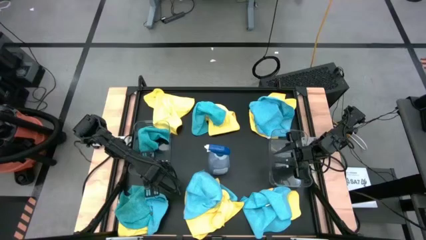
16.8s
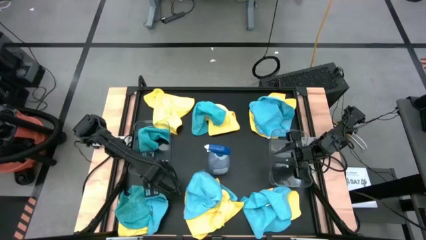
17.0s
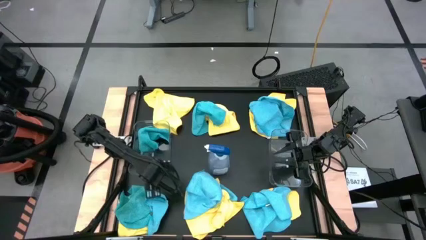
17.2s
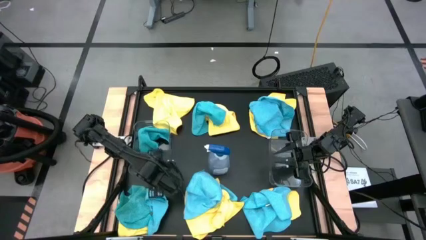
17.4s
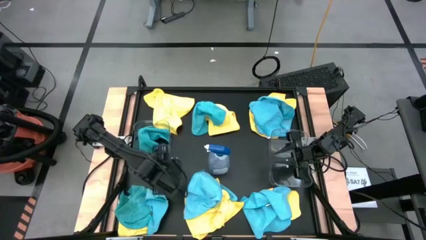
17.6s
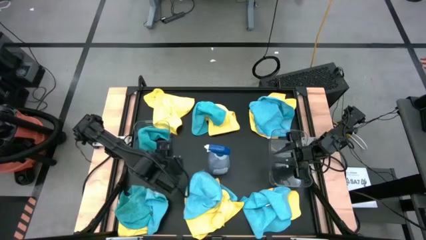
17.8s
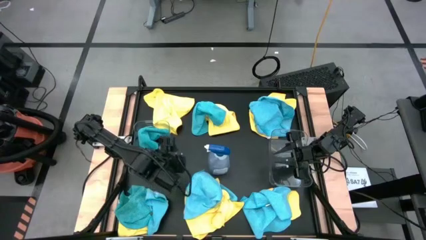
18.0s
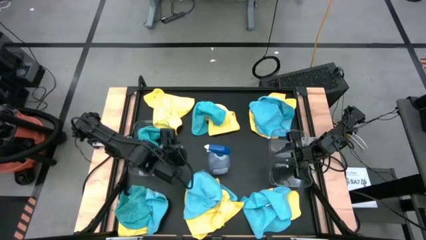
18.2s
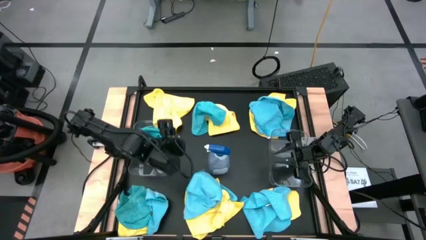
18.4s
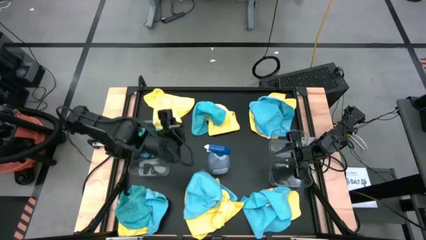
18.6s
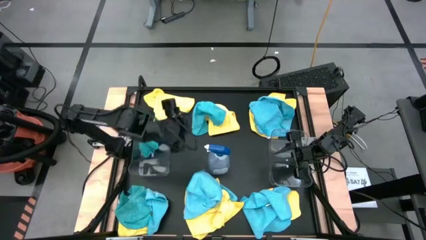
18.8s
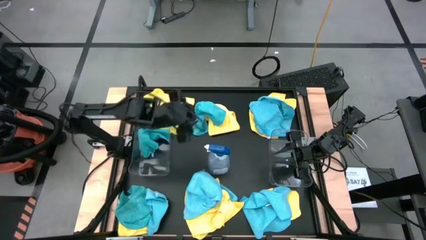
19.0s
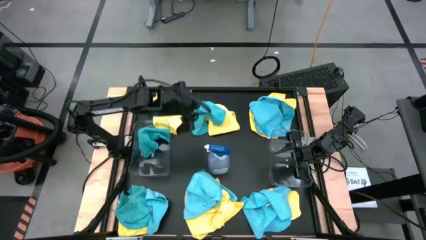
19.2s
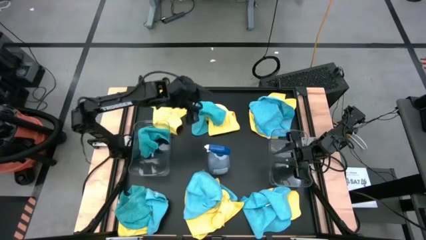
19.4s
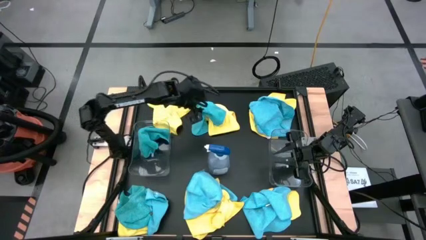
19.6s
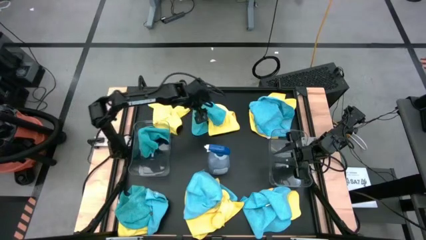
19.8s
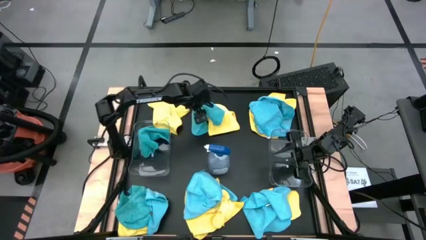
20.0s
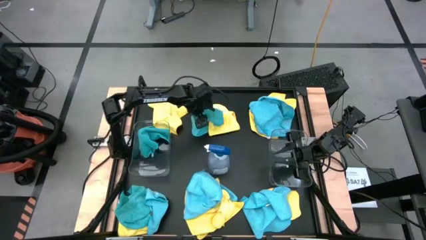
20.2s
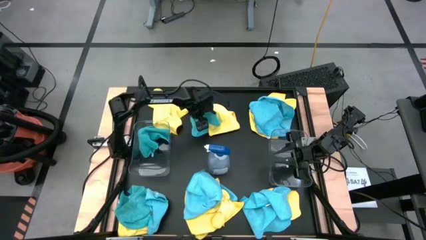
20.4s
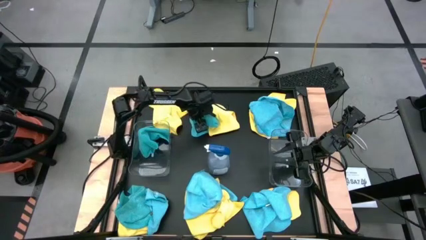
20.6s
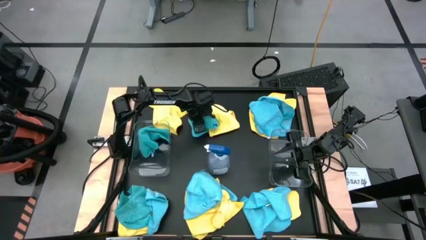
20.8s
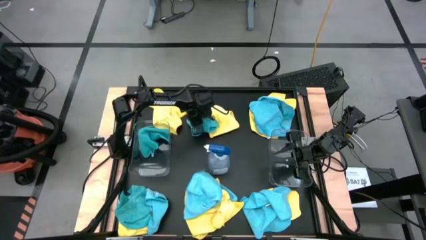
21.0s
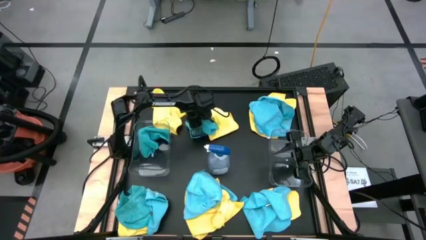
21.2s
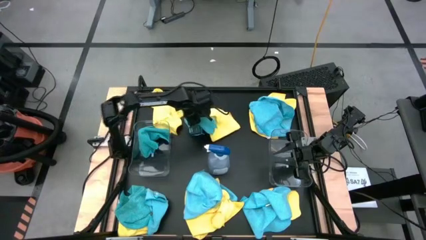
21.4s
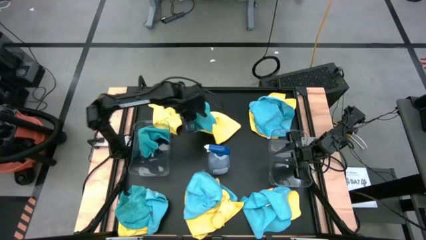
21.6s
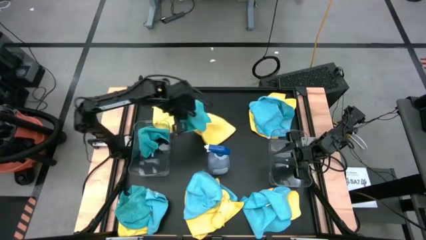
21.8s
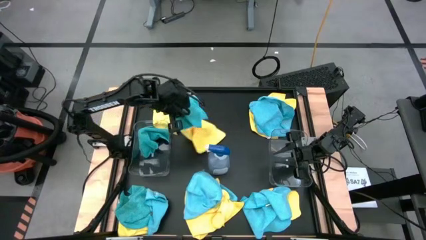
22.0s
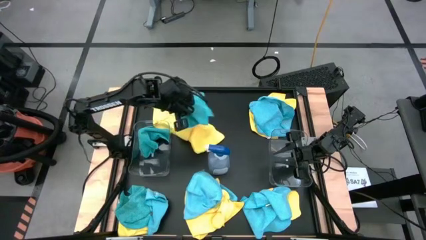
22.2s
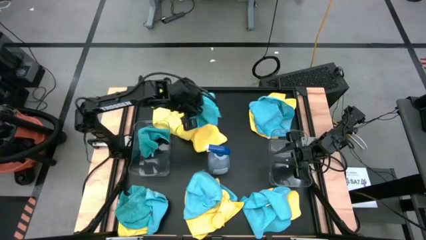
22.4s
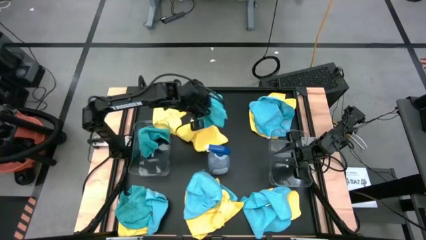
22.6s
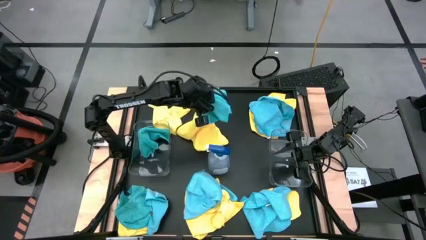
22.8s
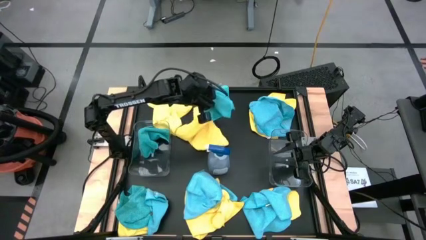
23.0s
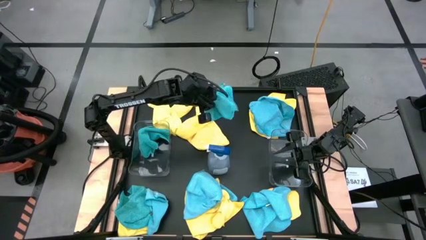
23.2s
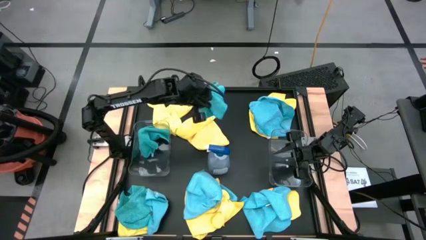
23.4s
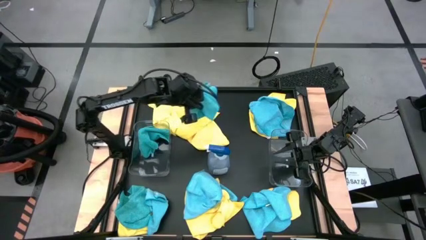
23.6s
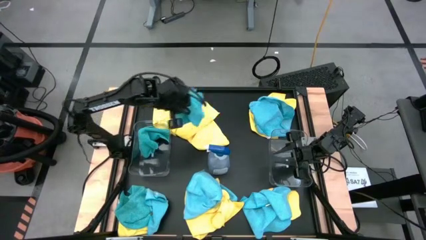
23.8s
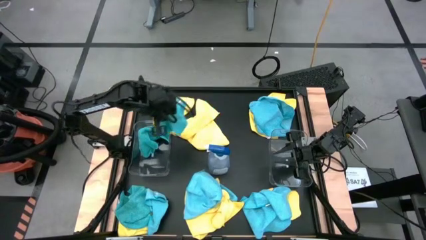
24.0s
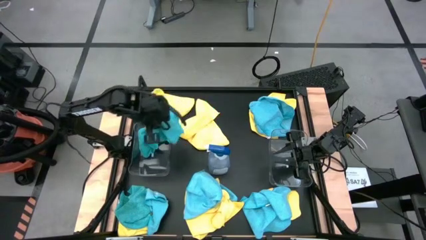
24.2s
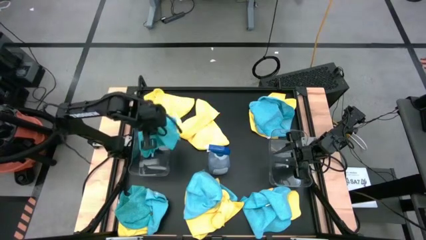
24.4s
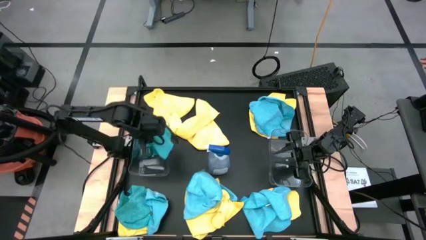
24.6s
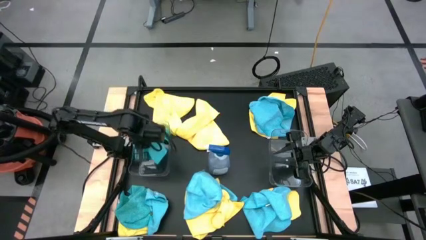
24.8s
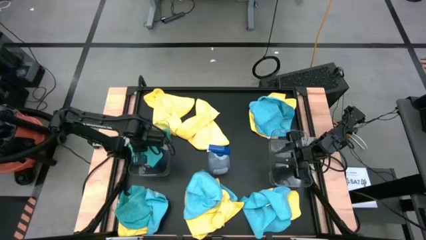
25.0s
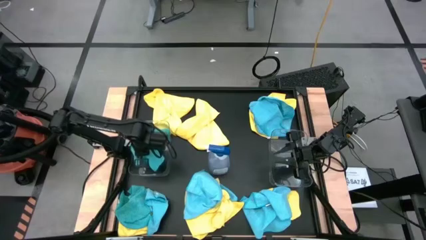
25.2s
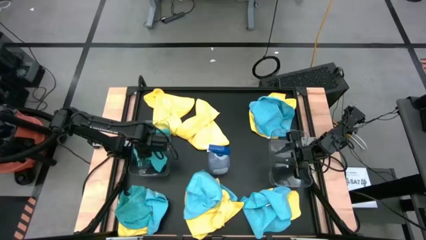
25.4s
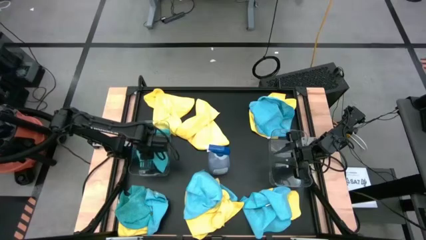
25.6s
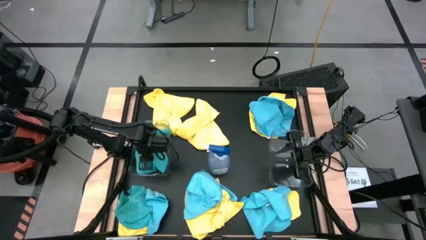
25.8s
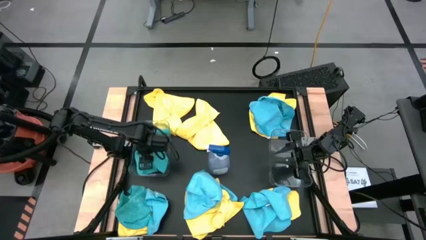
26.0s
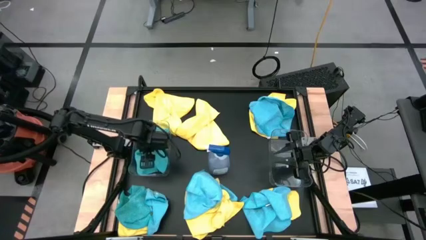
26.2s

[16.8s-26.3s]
Task: Sort microfiber towel by color & place in baskets
Put the blue microfiber cloth into the left transparent bin

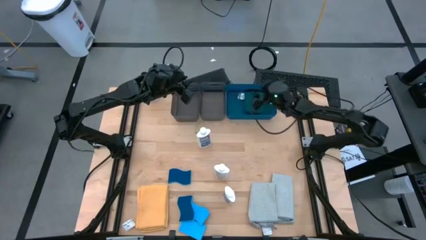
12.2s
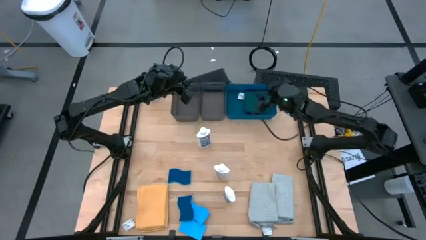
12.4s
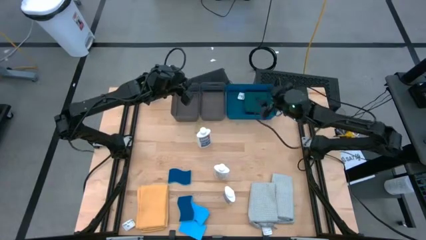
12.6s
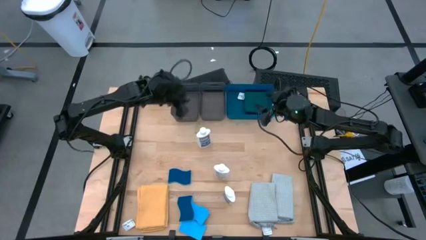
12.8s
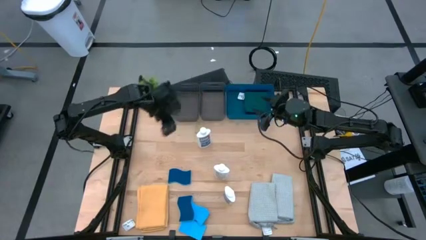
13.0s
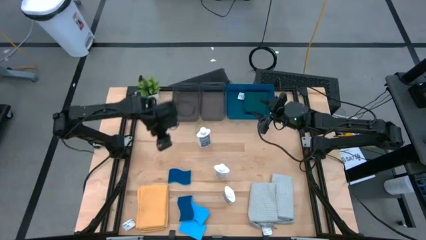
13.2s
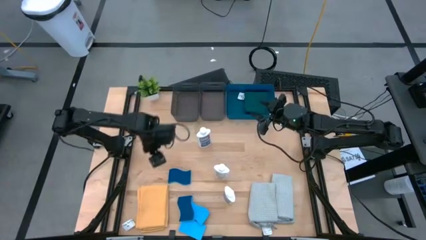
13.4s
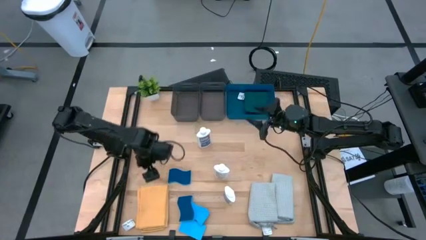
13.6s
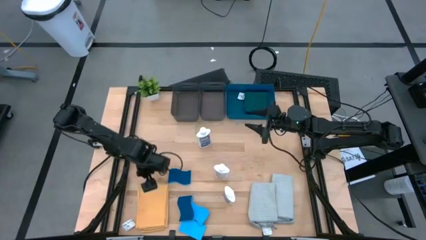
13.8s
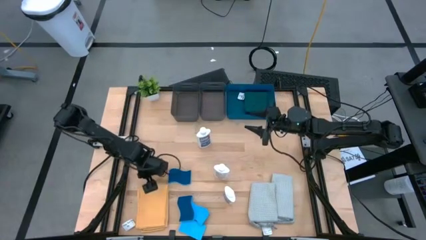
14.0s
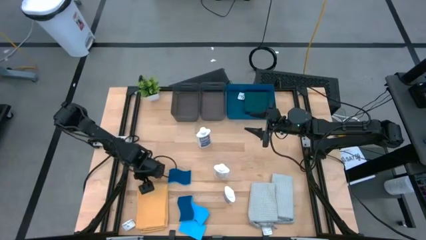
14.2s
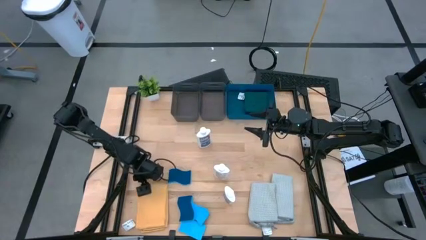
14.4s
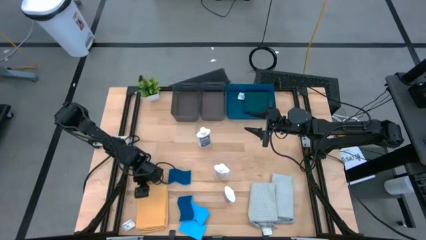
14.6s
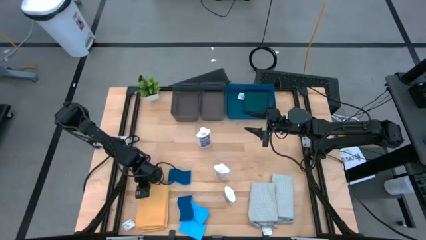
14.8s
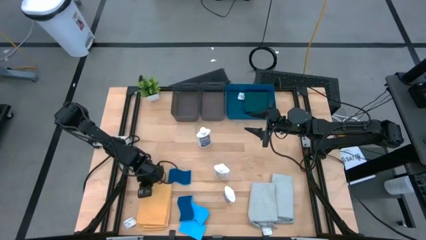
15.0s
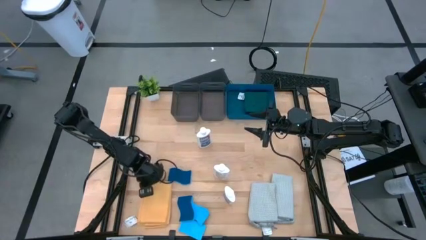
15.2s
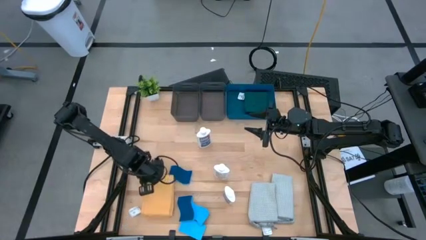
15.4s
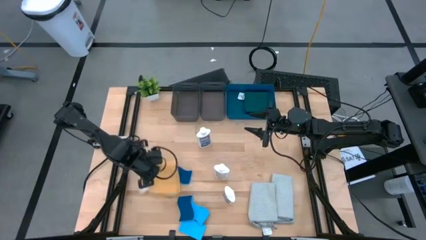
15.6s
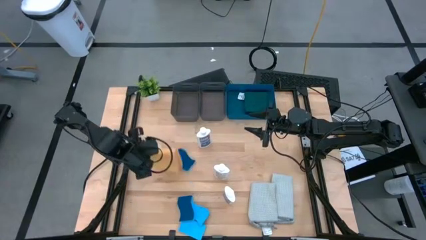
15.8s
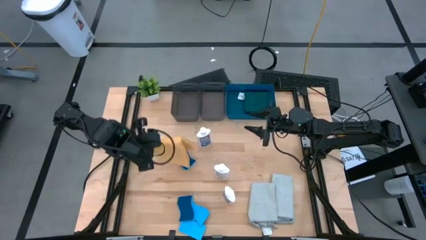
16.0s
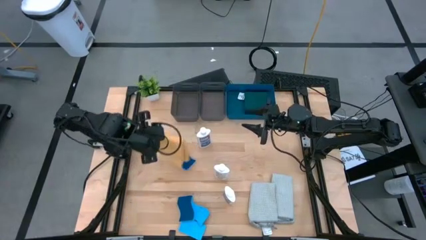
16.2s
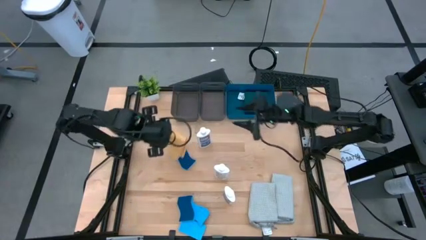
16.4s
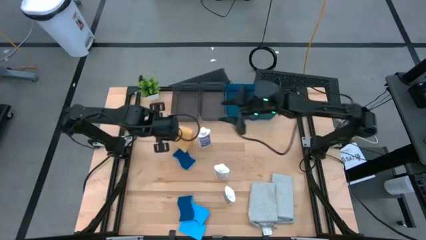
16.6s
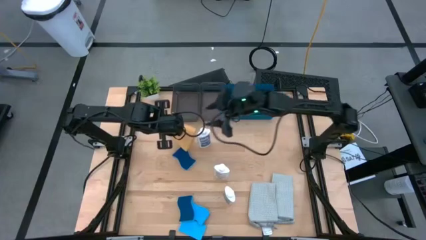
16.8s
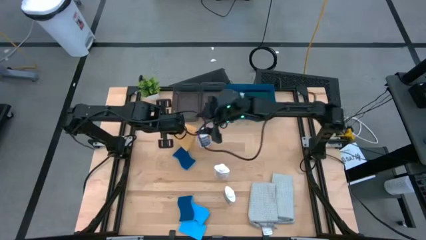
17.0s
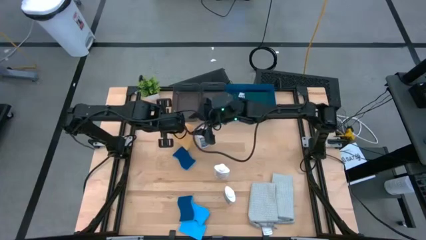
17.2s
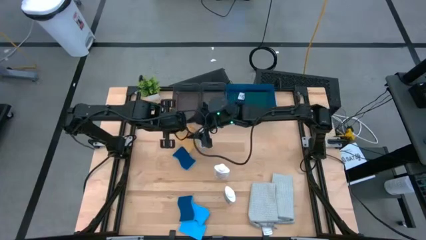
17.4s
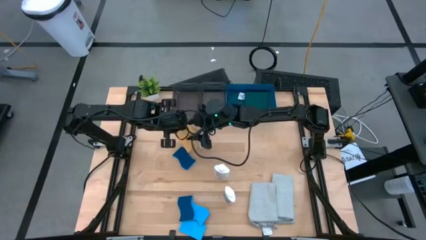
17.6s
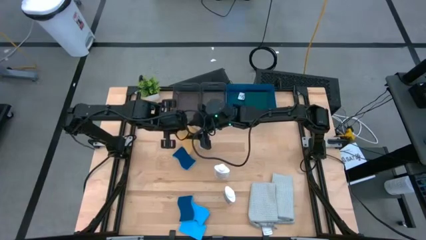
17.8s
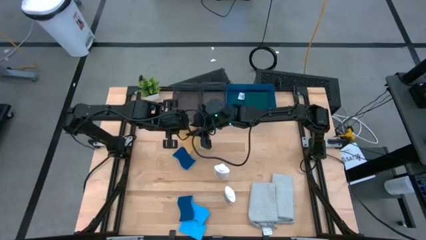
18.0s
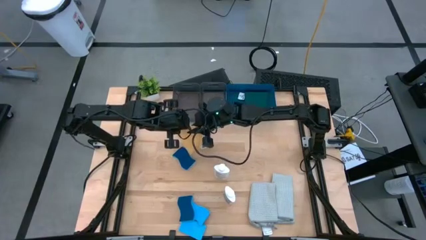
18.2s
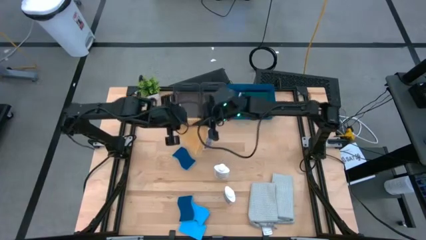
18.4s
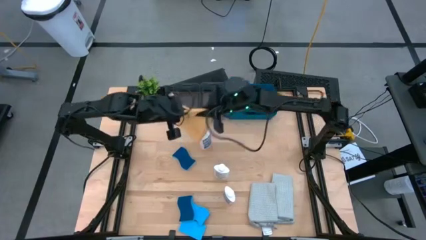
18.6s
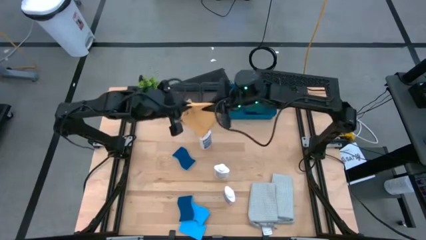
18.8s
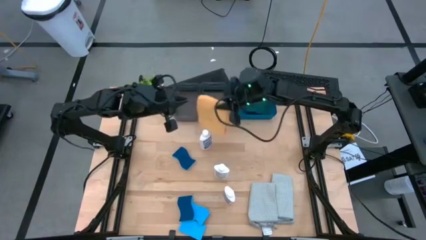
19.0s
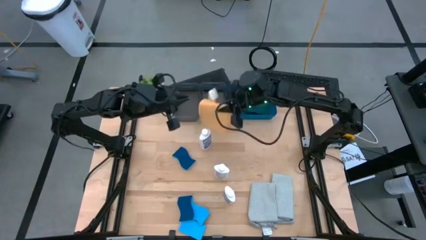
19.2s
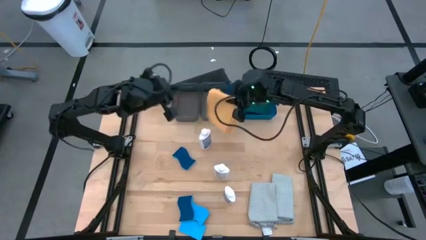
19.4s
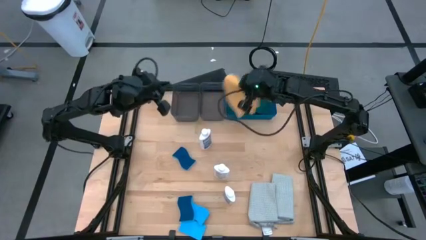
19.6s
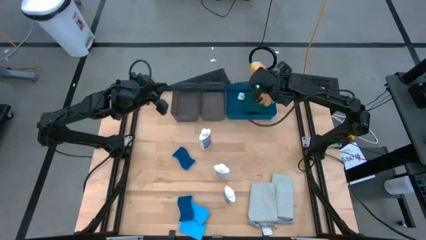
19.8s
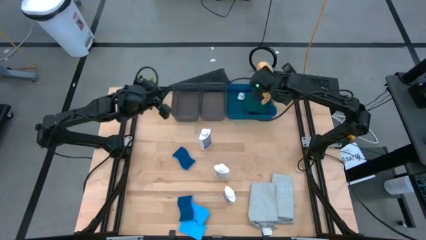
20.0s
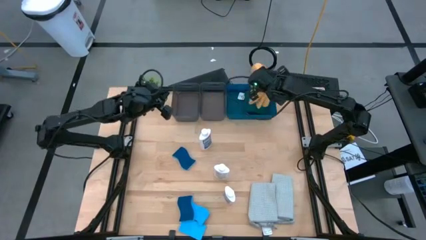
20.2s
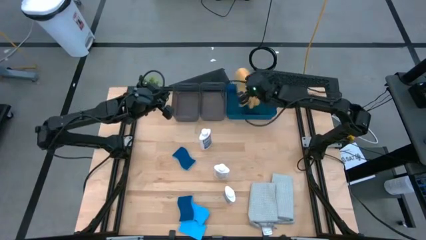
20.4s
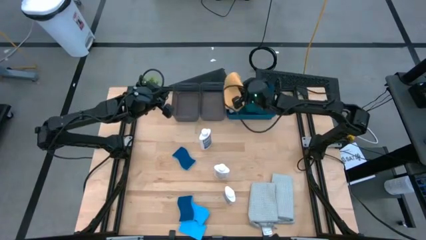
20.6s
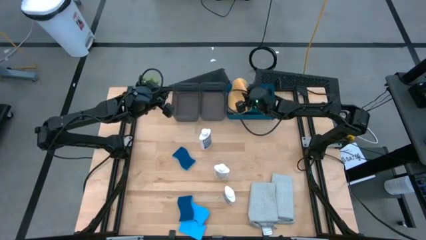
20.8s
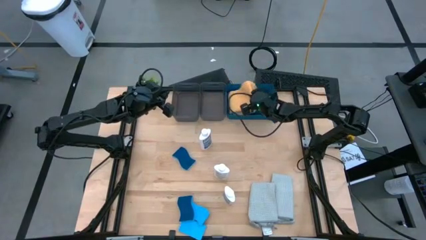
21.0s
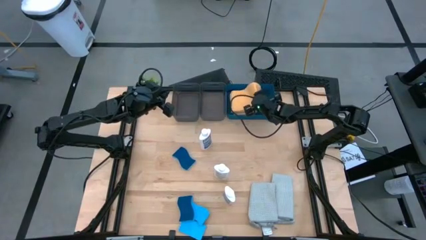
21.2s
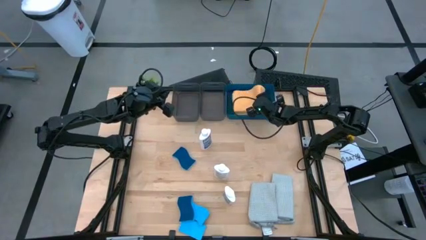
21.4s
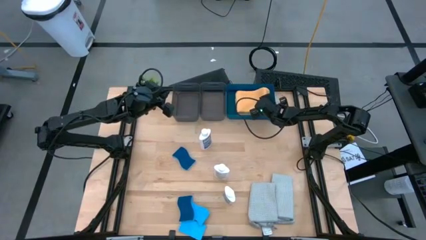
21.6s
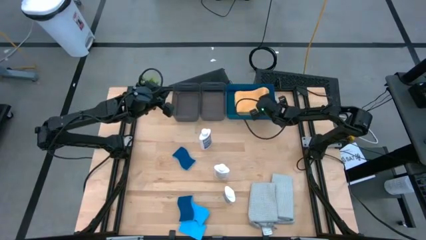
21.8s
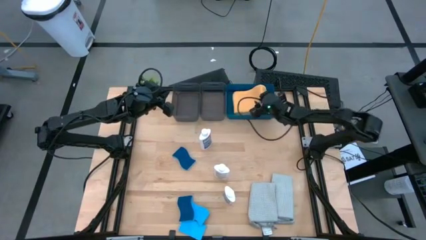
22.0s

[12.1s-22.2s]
Task: Pick & Place Kitchen Items
Put the yellow towel into the blue bin
